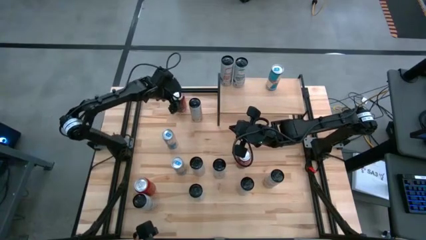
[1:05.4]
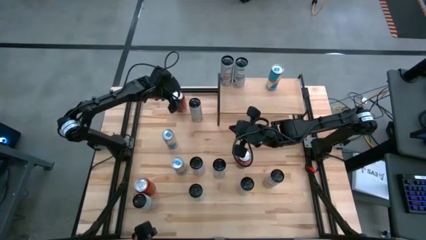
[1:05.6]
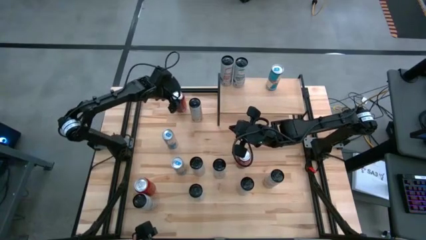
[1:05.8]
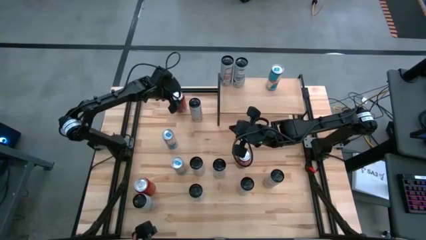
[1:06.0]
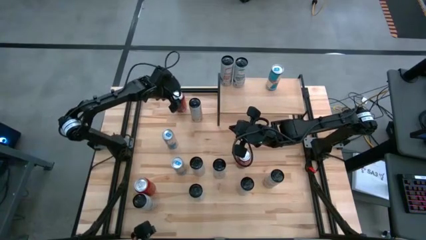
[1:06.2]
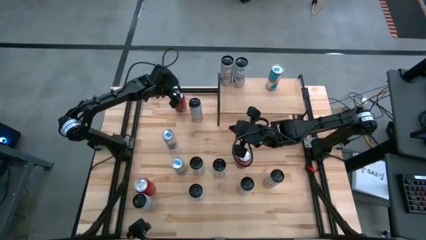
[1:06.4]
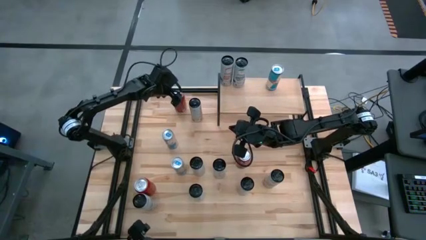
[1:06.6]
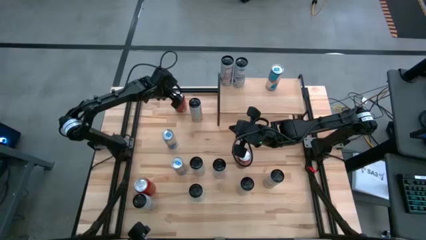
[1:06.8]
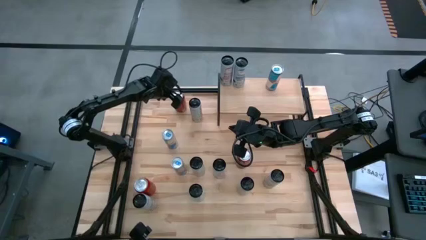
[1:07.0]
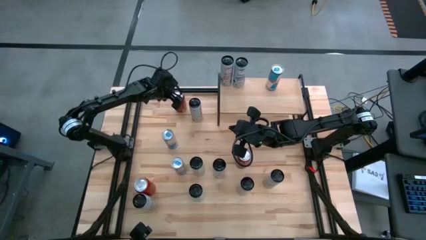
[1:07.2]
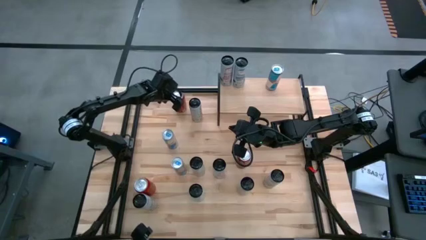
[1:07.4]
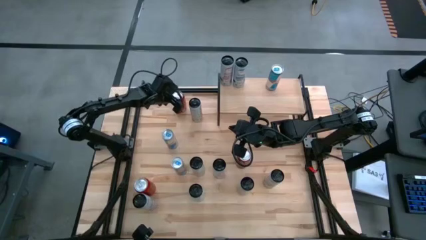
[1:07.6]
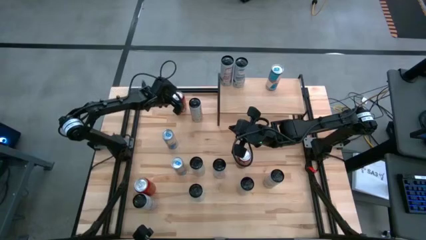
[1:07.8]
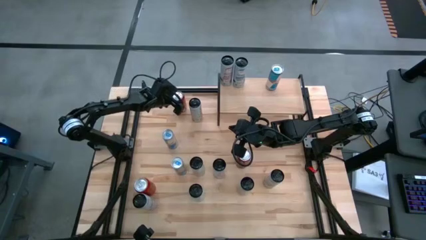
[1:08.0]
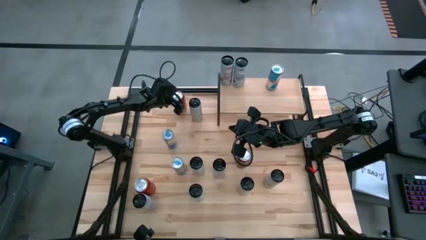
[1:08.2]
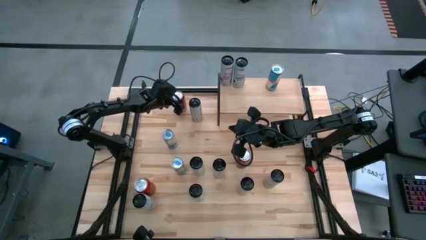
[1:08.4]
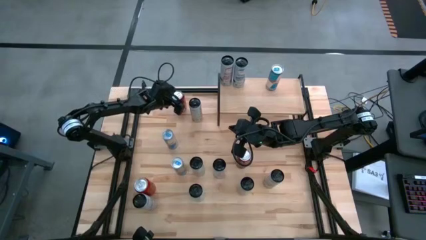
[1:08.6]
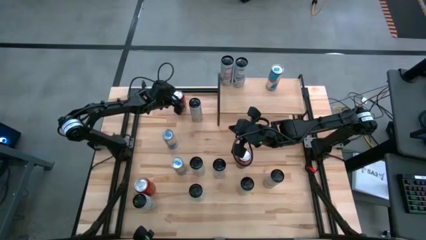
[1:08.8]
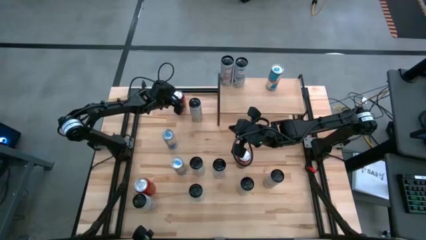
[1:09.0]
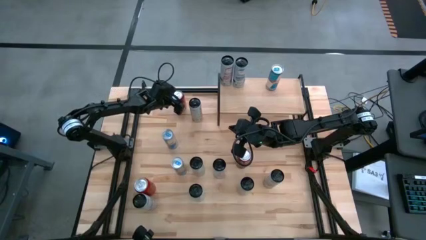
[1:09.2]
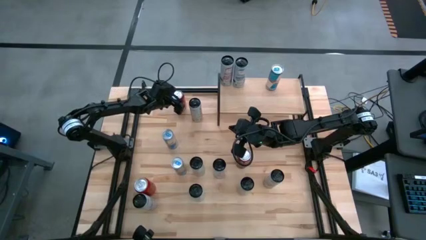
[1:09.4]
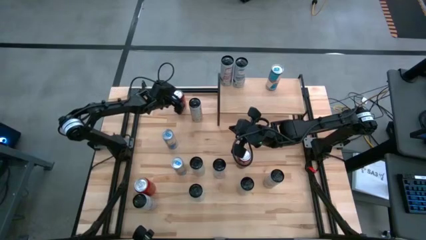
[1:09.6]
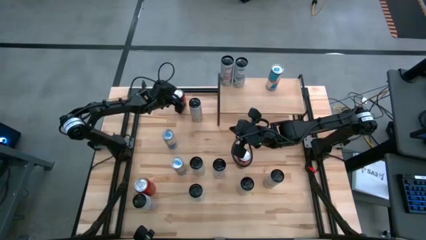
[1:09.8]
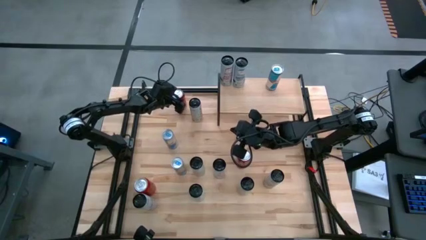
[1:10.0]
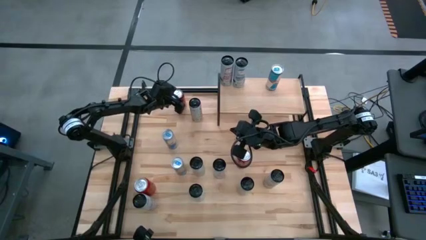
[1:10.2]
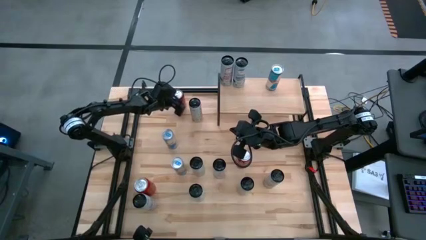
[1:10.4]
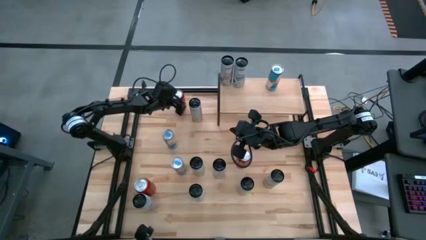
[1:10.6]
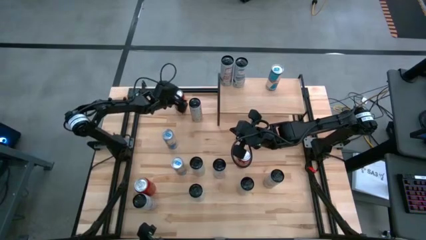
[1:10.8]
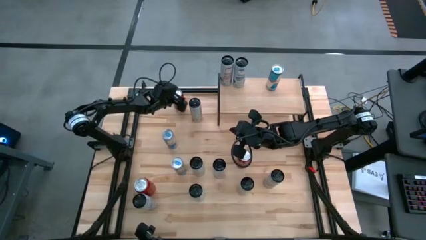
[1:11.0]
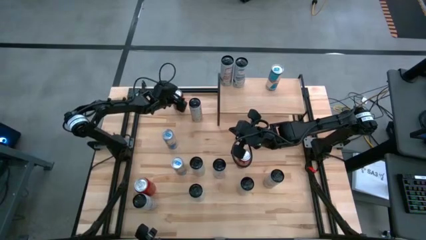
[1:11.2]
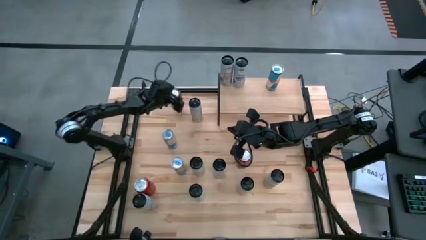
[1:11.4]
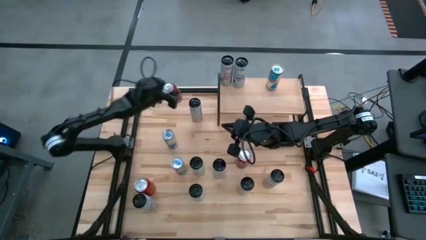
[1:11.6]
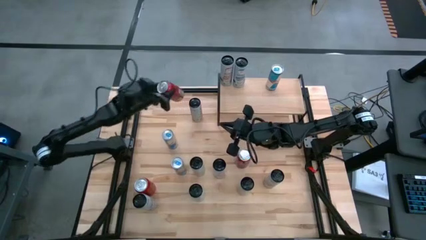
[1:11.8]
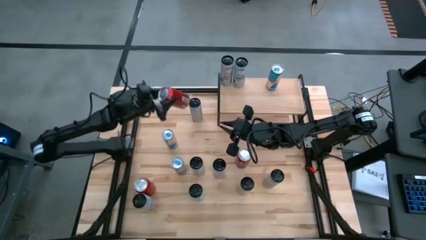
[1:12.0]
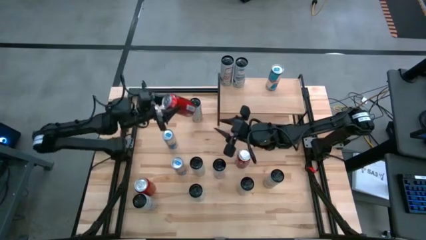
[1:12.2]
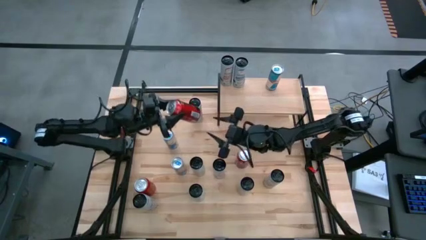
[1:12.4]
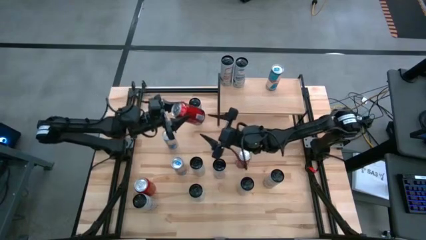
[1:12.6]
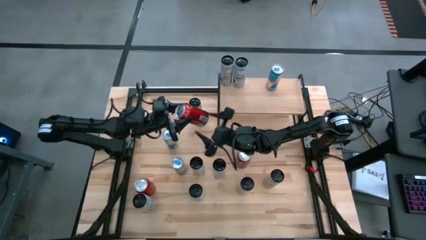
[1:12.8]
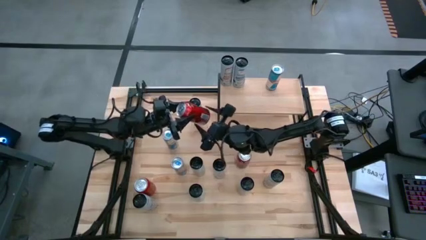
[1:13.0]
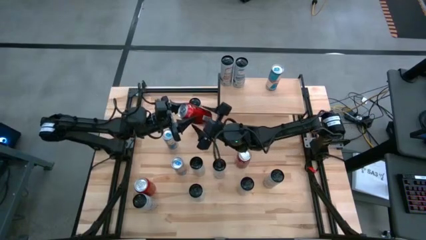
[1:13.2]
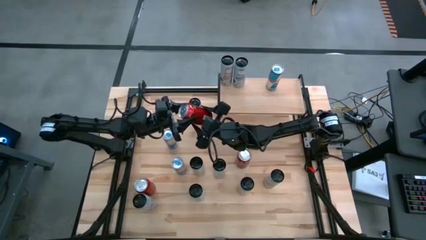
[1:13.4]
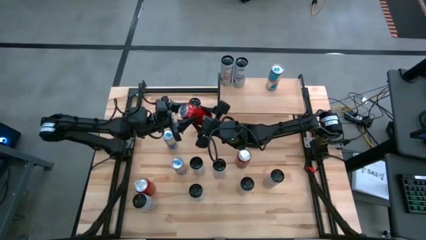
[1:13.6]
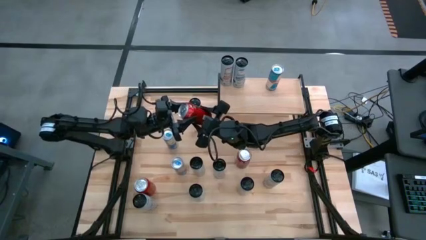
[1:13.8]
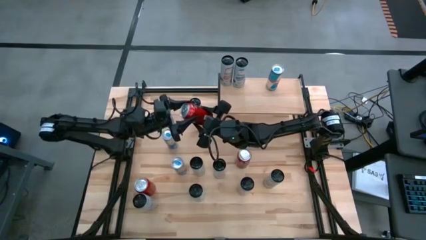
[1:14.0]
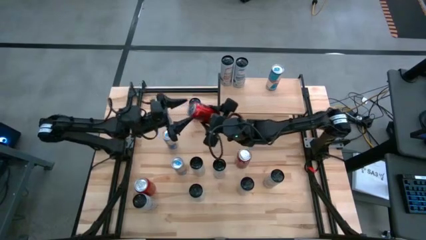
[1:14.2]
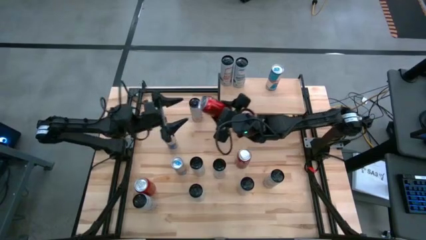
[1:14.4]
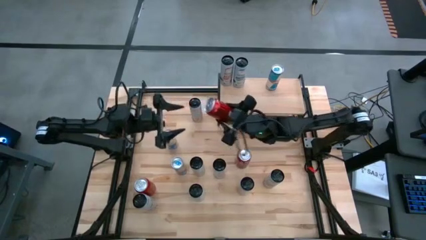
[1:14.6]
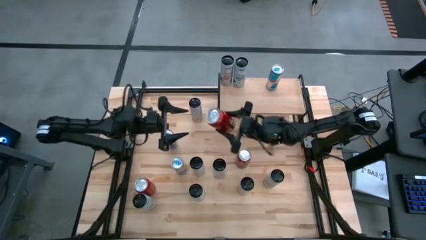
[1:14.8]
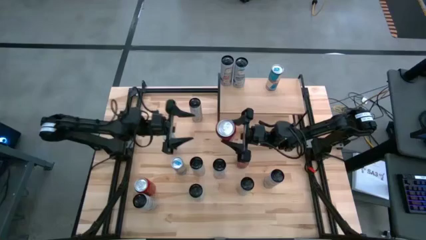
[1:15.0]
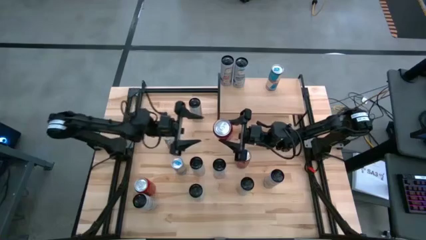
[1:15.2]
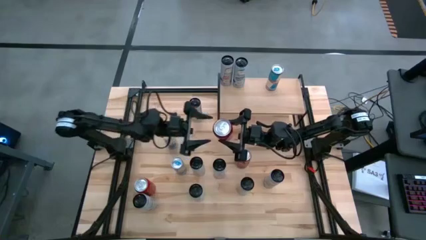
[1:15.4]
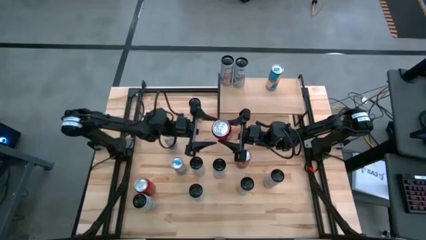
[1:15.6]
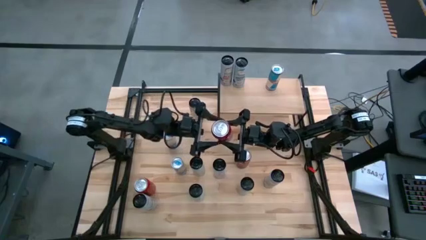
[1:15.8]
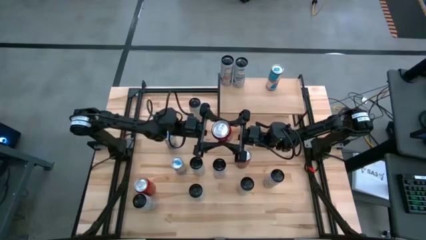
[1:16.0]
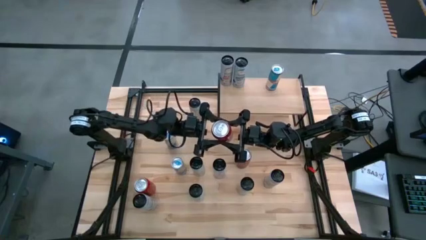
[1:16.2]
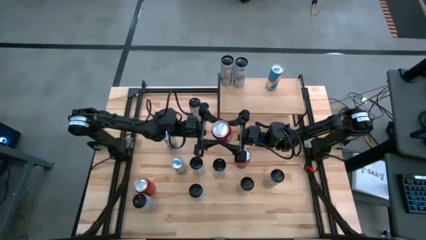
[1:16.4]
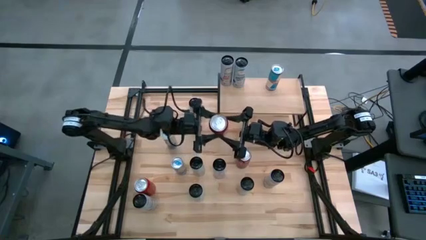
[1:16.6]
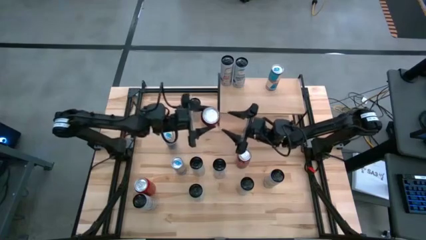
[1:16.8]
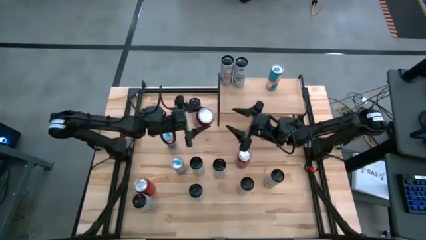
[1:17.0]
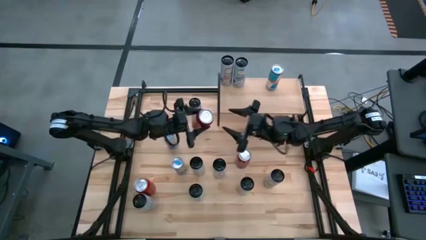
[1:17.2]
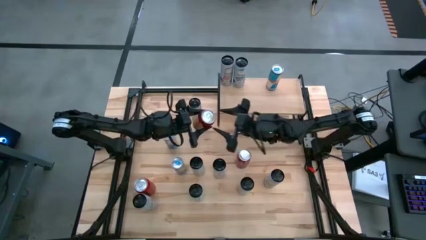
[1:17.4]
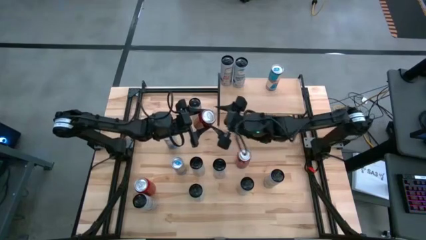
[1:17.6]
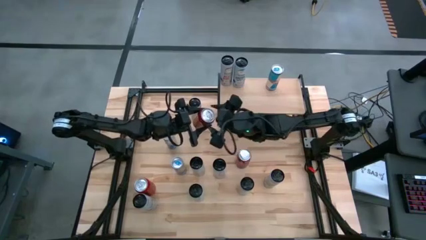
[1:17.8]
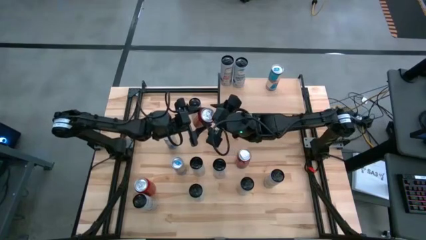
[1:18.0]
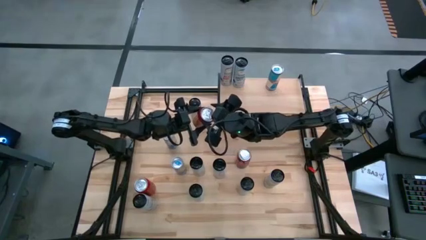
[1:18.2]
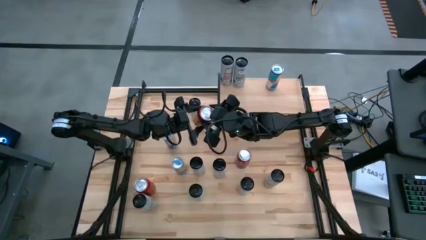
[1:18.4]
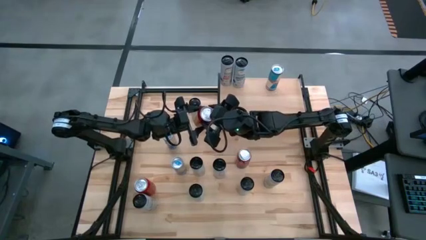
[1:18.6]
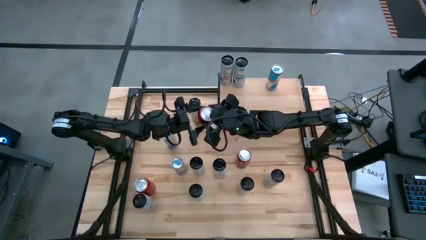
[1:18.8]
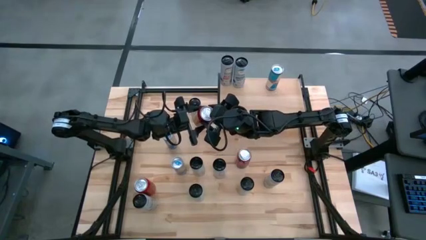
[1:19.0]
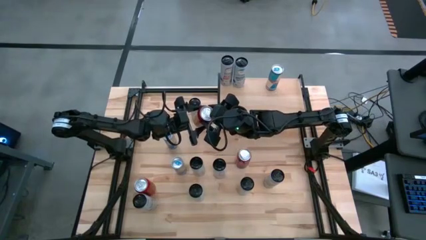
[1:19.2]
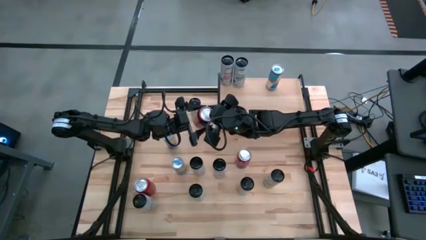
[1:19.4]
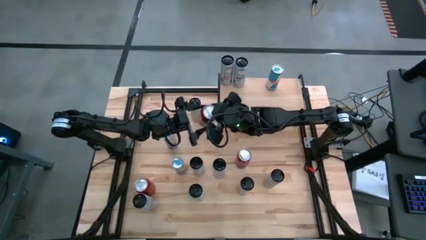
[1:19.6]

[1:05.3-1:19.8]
Task: Place canned beverage on shelf
Put the top red black soda can on the shelf
